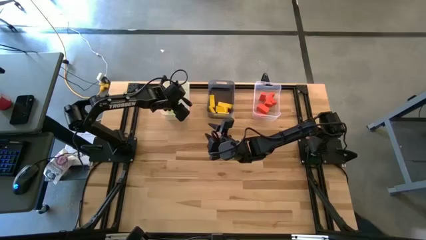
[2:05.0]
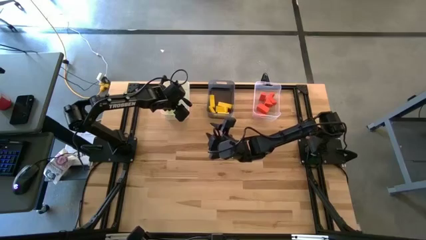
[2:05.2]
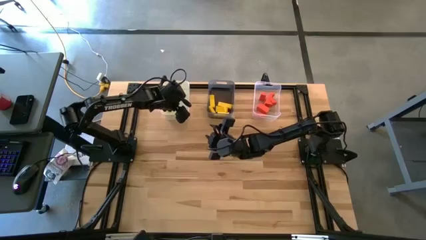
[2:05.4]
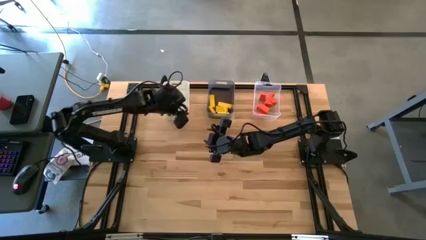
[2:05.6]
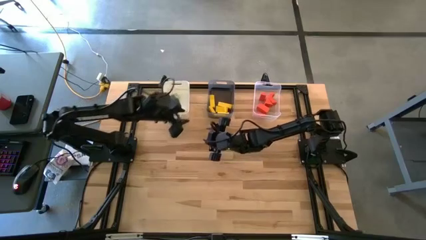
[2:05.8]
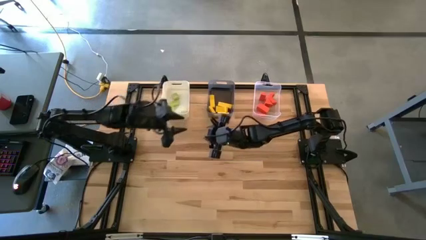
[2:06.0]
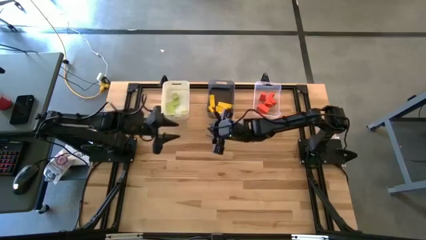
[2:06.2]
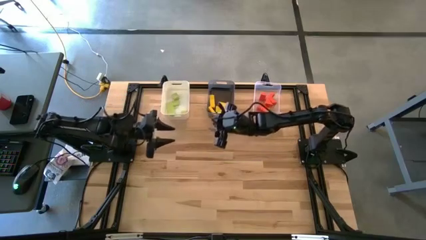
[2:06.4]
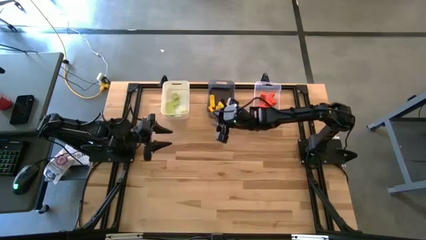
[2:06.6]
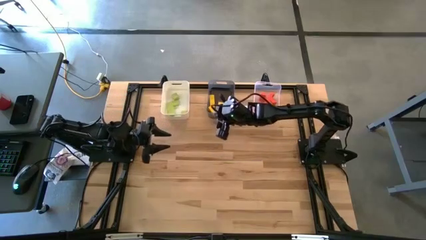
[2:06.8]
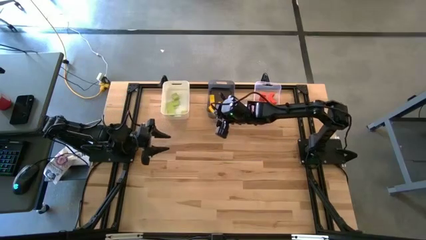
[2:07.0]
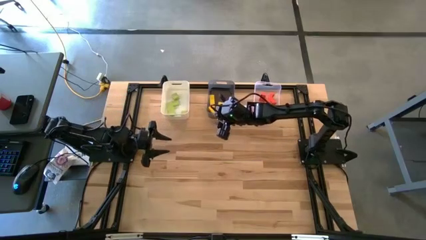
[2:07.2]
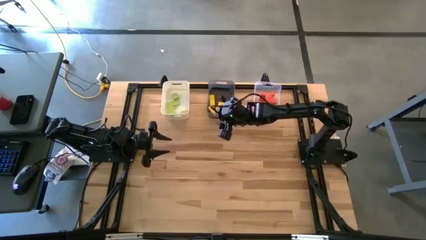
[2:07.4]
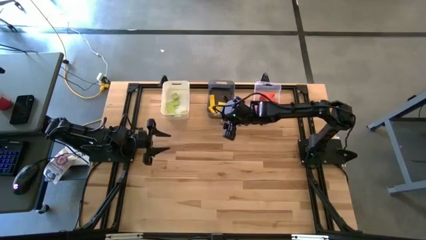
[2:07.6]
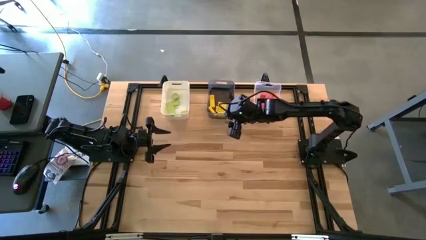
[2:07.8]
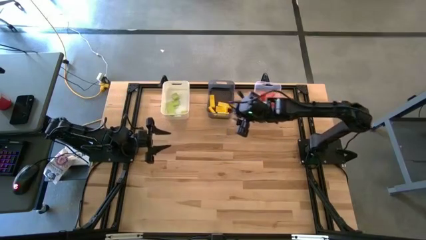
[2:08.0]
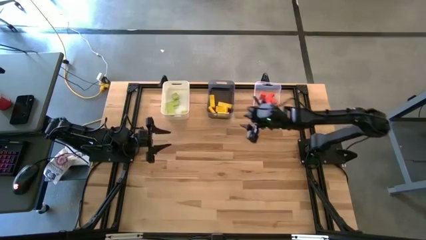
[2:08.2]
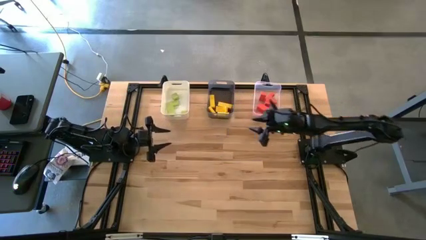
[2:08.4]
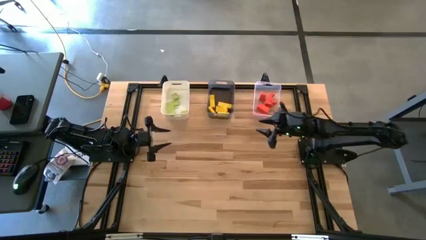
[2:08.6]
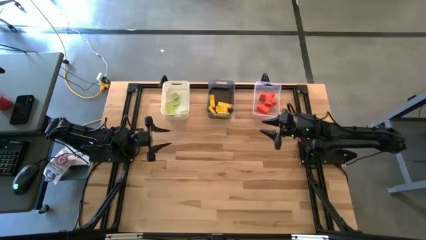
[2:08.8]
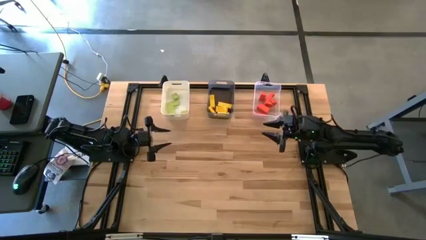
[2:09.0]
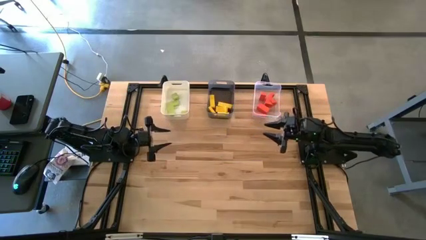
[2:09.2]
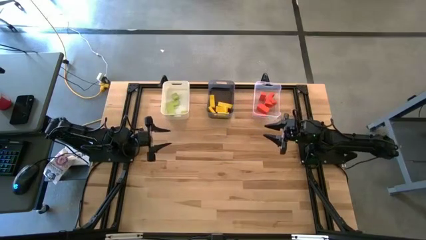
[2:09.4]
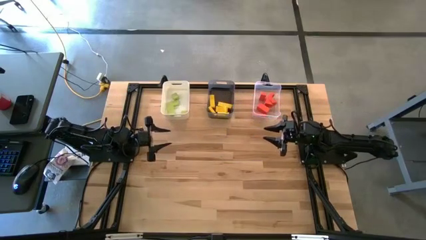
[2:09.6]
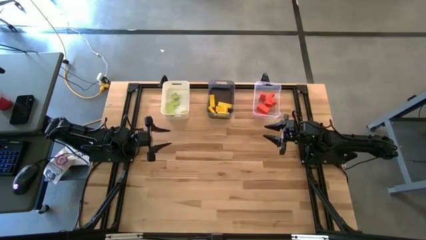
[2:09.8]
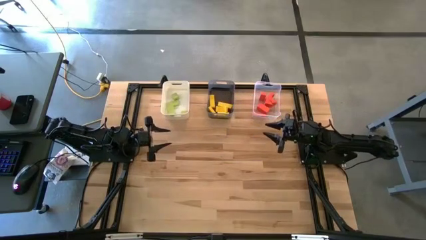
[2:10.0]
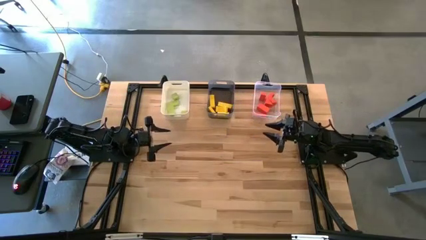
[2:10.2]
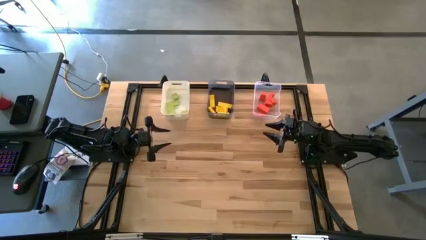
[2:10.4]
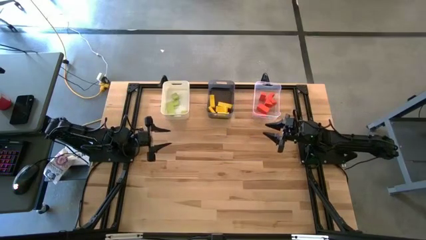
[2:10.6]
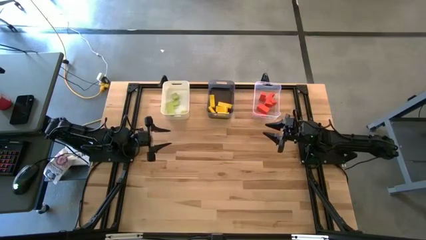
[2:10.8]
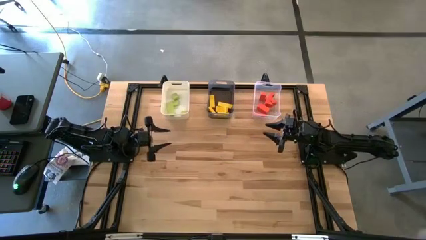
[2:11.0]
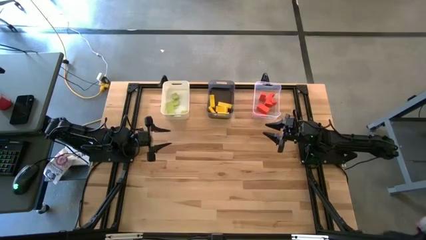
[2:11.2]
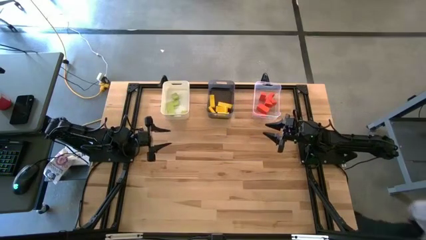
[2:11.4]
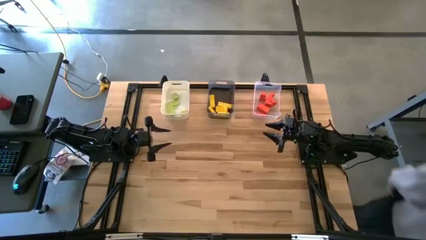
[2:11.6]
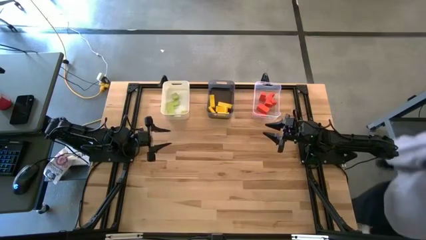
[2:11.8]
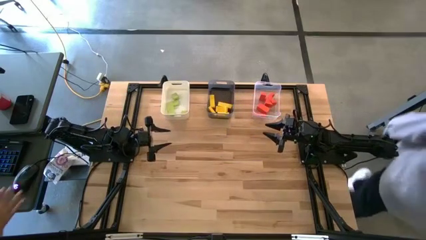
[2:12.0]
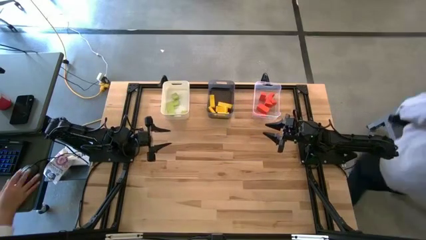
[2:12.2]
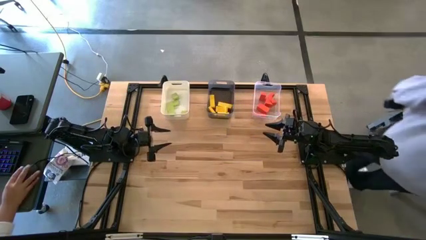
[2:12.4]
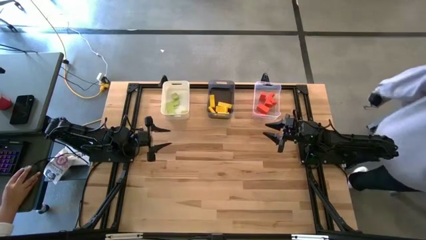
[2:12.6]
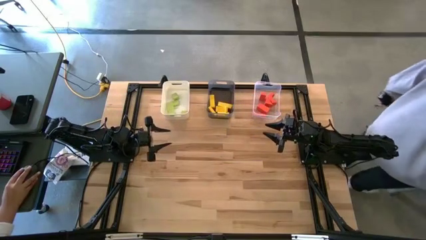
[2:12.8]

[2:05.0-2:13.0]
Task: Sort & place blocks by color
Return to Home Position

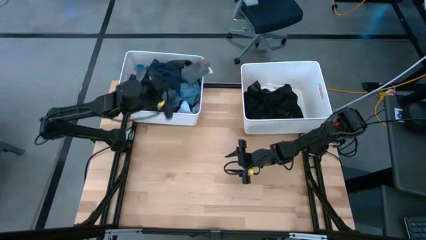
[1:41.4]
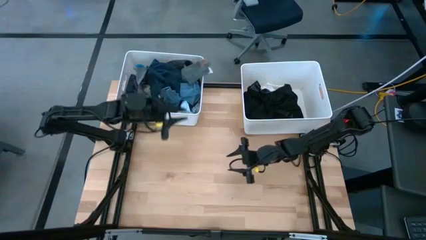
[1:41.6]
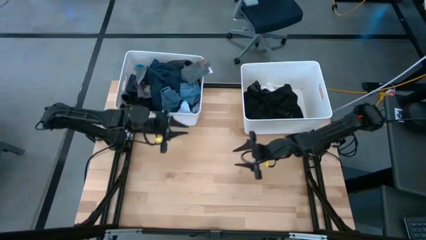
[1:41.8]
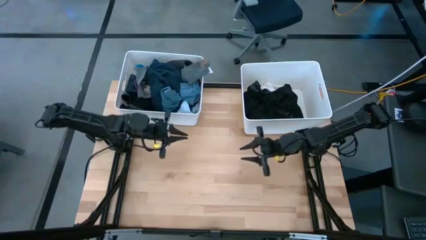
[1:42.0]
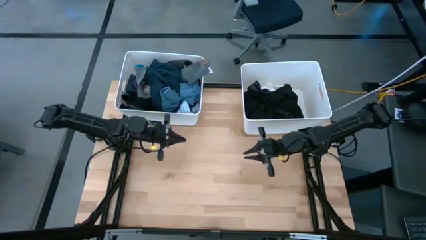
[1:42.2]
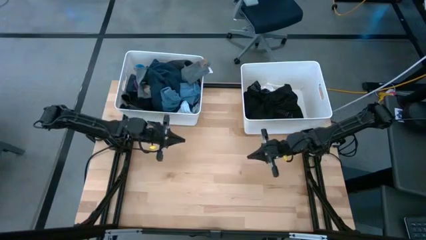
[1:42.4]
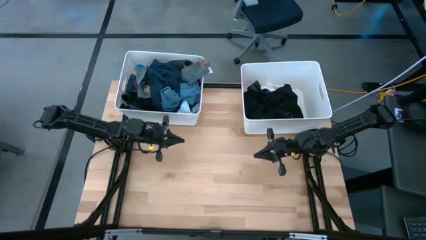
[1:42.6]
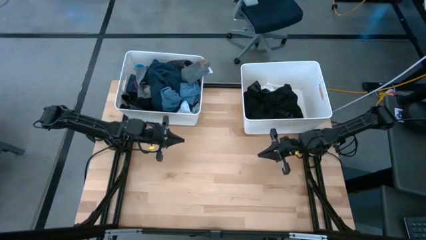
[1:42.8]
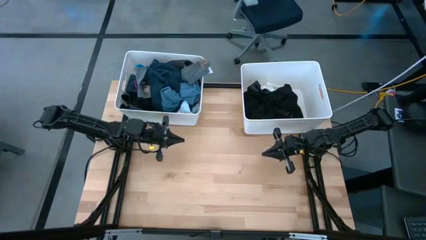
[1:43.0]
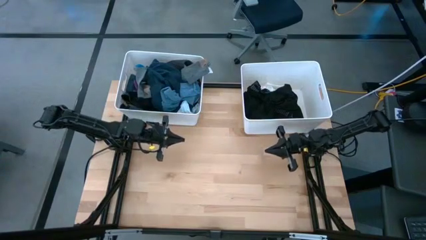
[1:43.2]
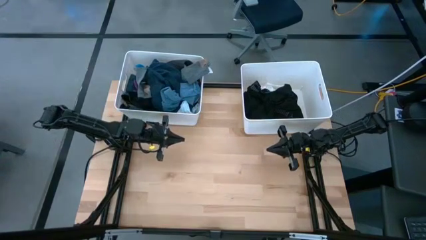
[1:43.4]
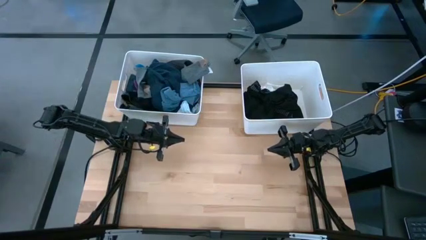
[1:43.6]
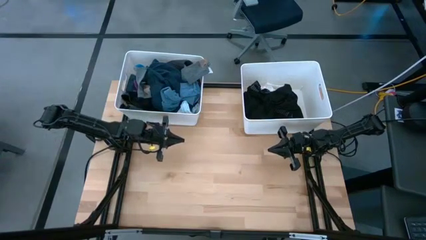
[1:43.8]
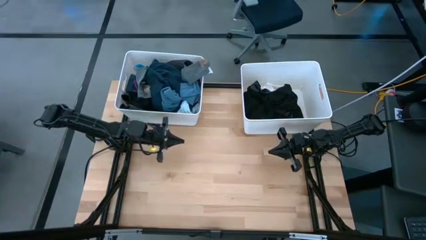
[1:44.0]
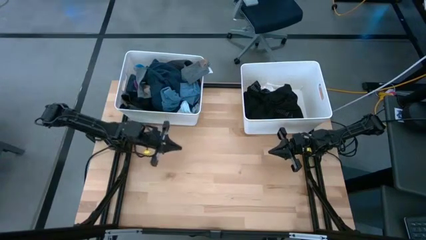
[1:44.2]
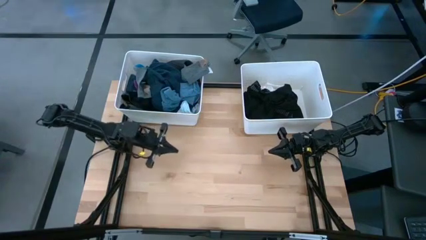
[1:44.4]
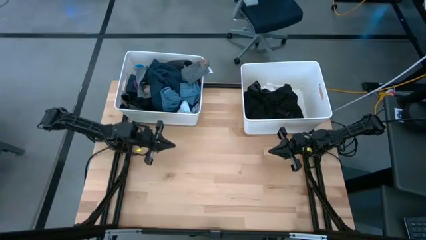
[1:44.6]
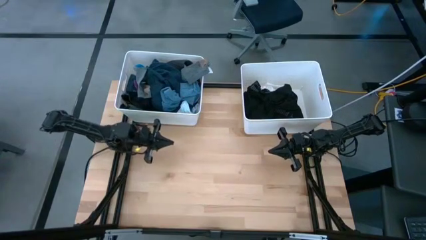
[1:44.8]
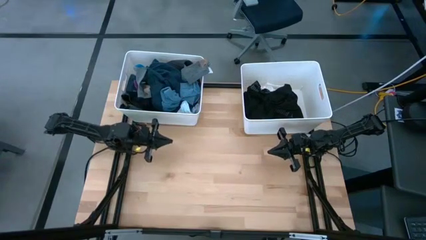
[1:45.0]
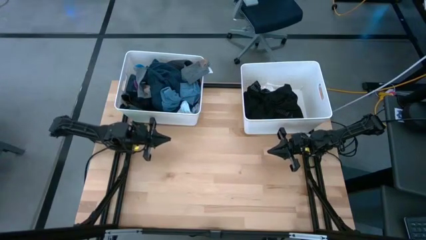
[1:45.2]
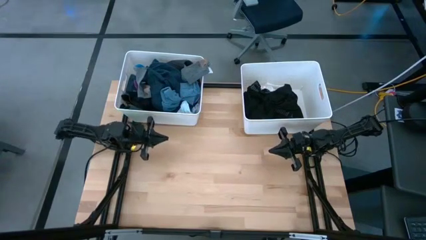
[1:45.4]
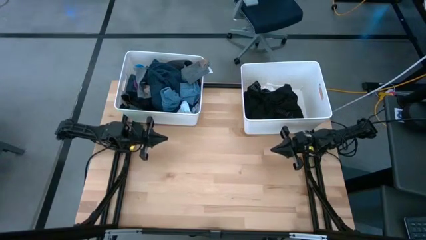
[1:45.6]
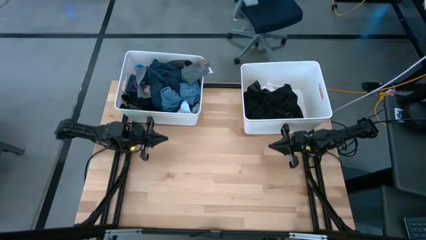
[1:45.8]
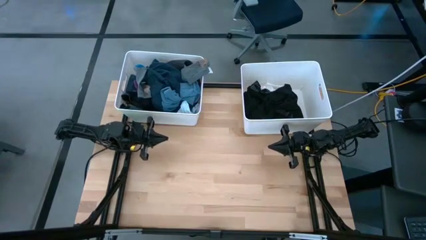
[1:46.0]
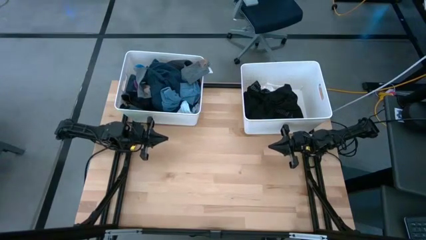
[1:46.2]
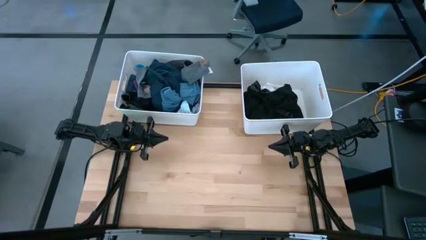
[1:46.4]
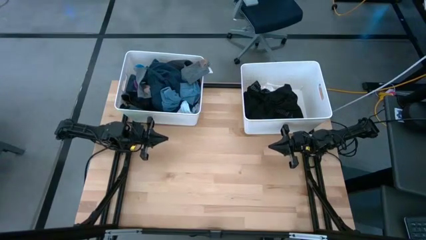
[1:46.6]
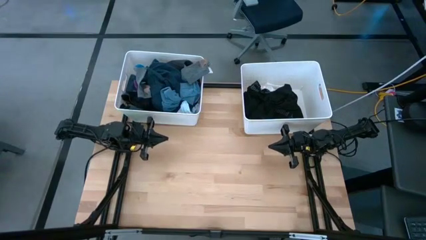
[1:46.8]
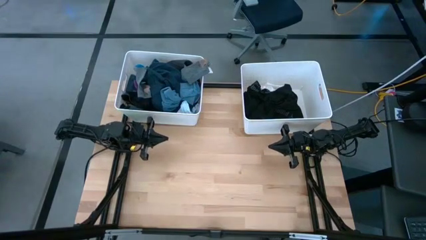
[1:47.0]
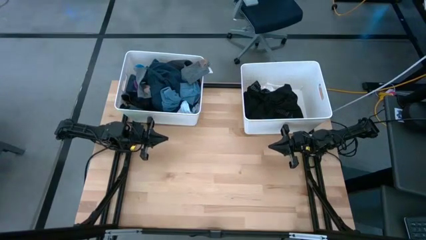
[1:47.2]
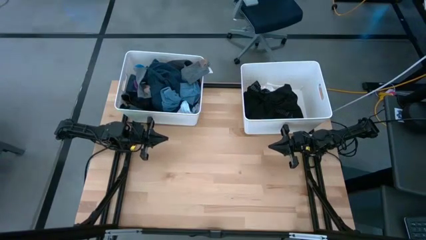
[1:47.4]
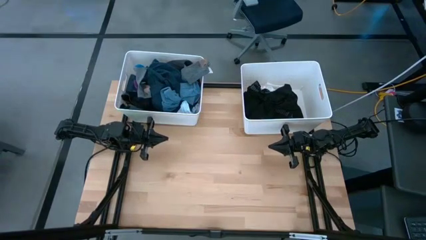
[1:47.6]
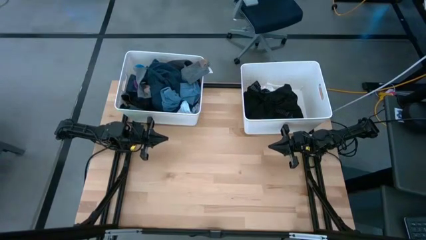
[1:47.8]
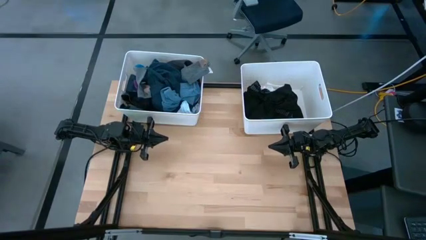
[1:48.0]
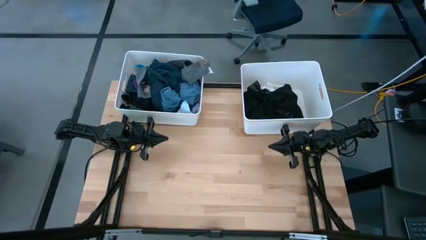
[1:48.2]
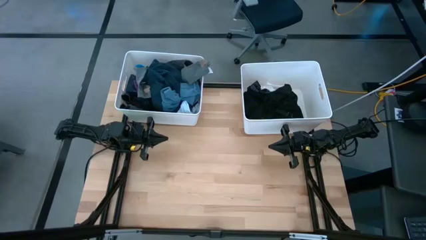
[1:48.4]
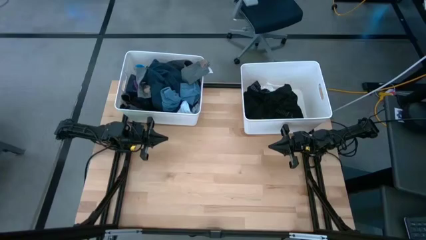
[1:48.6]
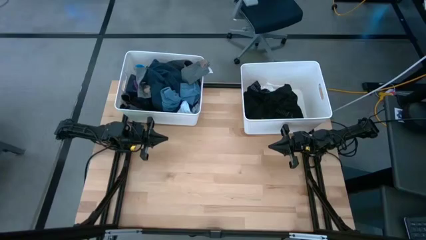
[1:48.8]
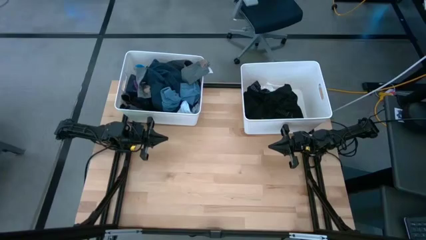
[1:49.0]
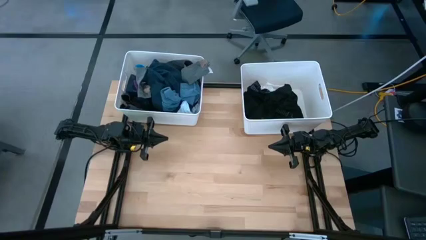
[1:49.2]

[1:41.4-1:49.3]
Task: Sort clothes
Return to Home Position
